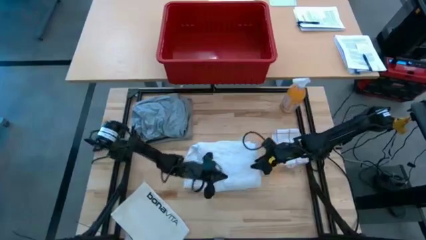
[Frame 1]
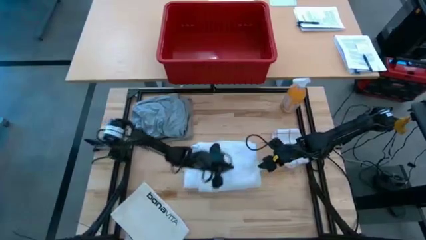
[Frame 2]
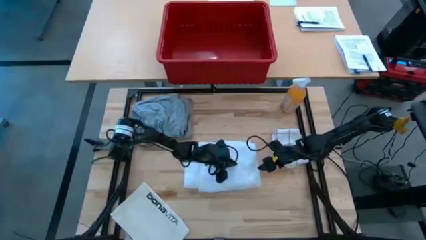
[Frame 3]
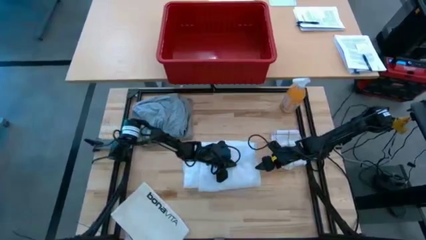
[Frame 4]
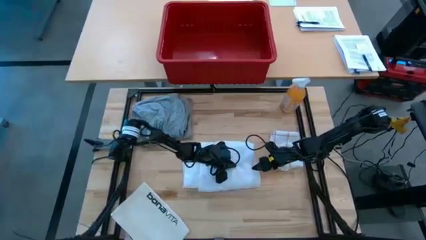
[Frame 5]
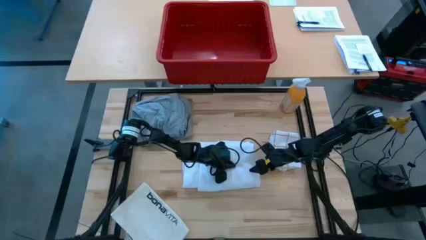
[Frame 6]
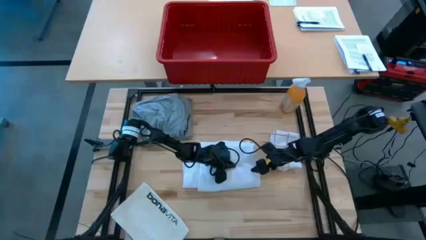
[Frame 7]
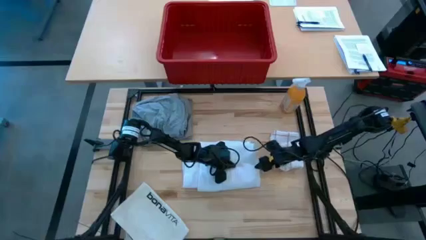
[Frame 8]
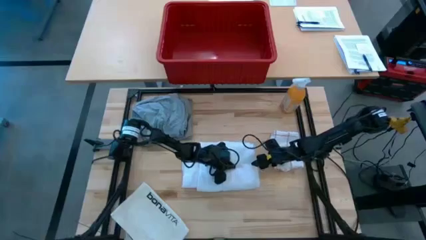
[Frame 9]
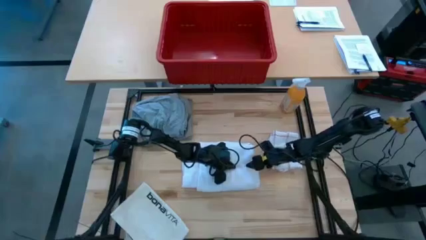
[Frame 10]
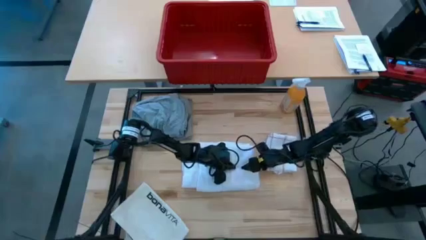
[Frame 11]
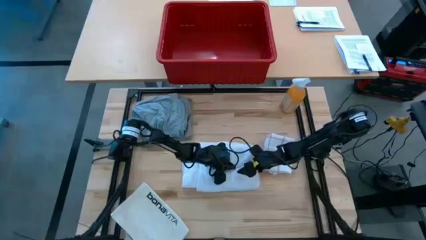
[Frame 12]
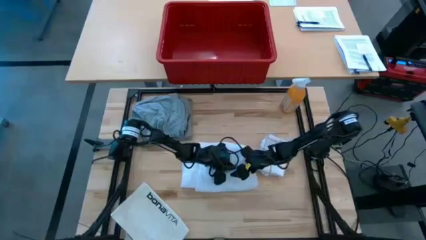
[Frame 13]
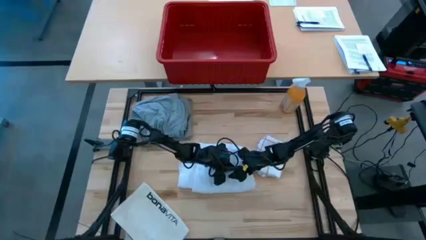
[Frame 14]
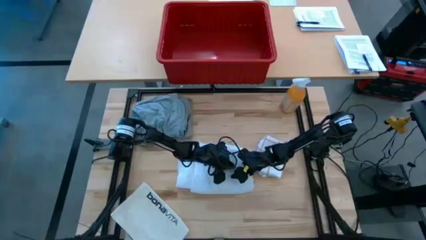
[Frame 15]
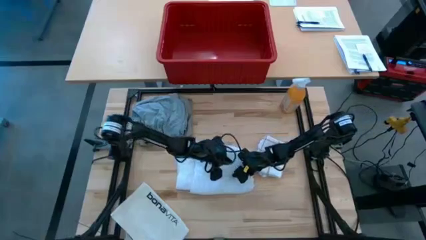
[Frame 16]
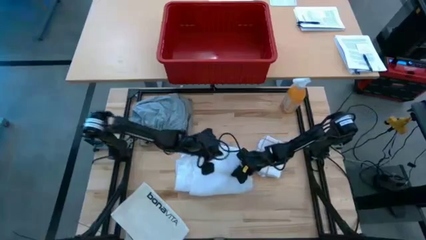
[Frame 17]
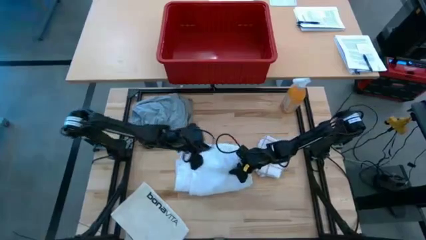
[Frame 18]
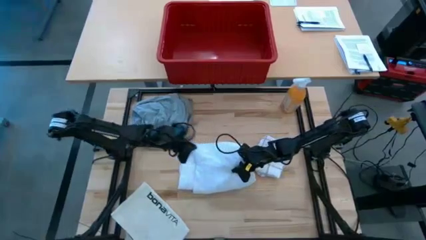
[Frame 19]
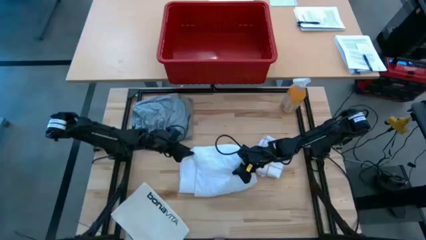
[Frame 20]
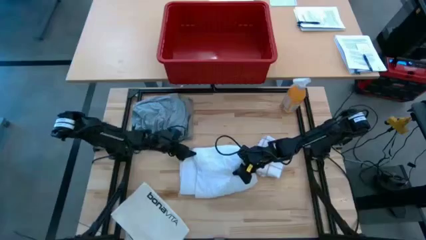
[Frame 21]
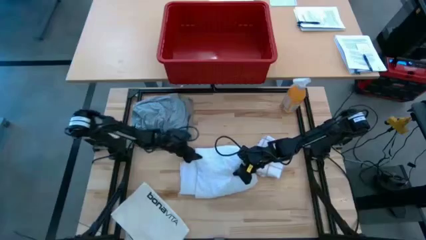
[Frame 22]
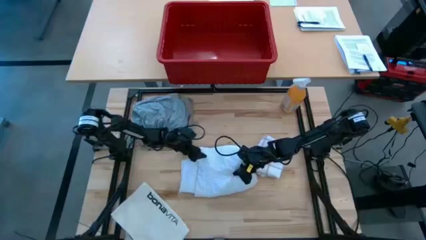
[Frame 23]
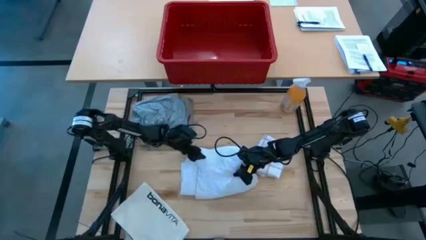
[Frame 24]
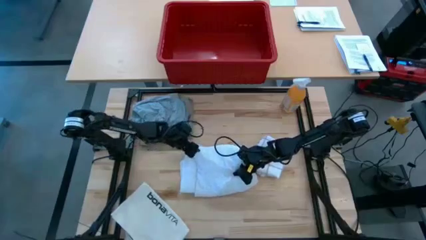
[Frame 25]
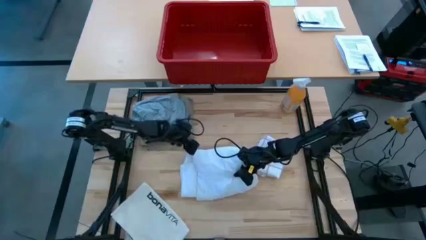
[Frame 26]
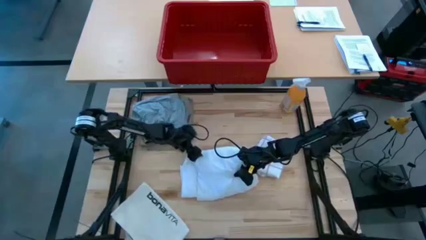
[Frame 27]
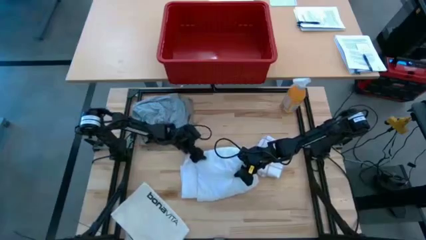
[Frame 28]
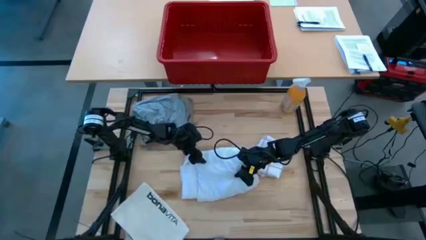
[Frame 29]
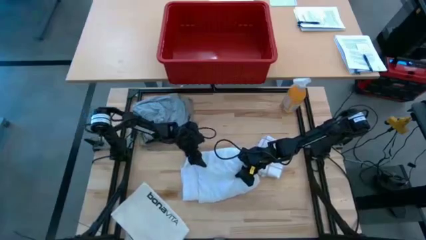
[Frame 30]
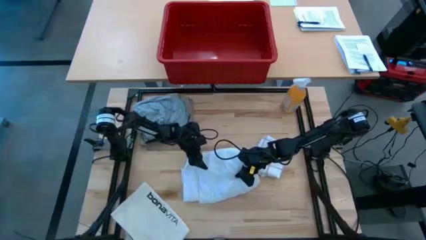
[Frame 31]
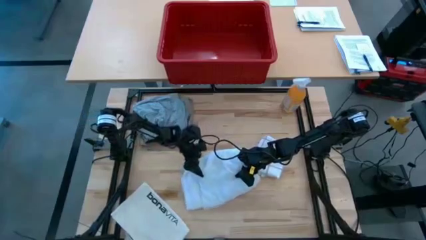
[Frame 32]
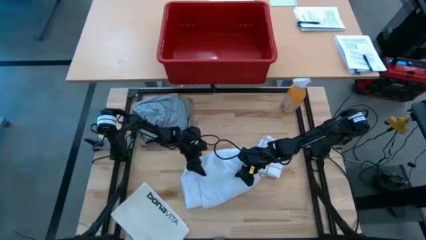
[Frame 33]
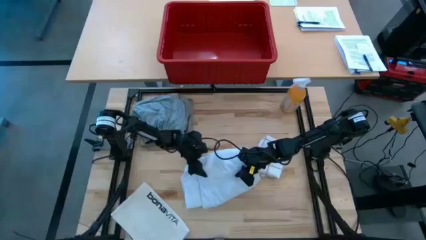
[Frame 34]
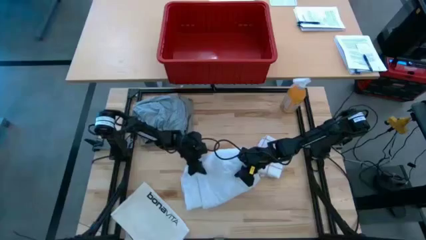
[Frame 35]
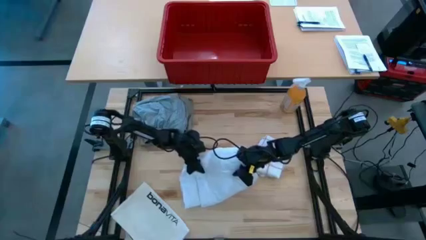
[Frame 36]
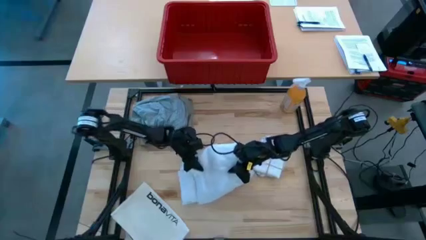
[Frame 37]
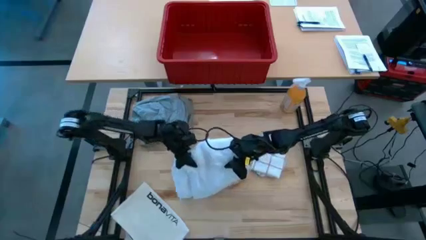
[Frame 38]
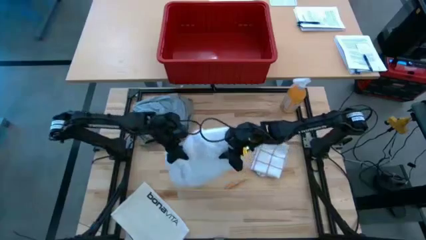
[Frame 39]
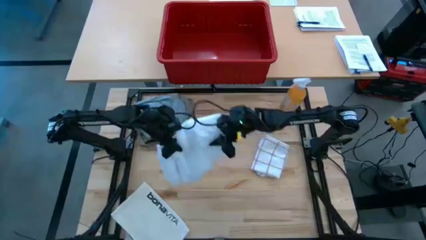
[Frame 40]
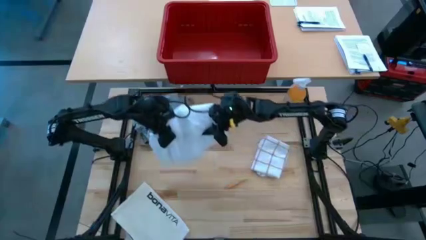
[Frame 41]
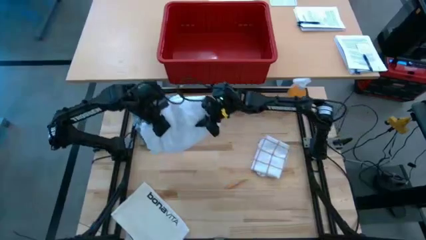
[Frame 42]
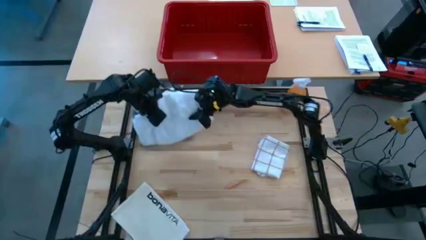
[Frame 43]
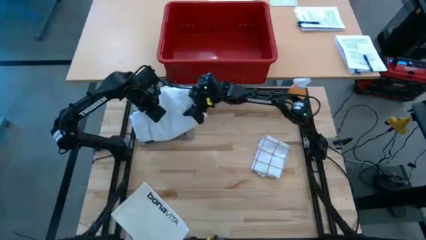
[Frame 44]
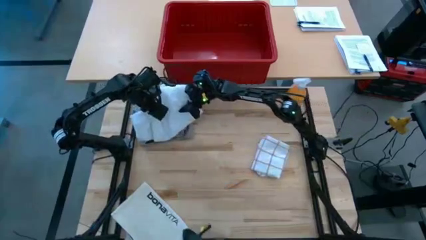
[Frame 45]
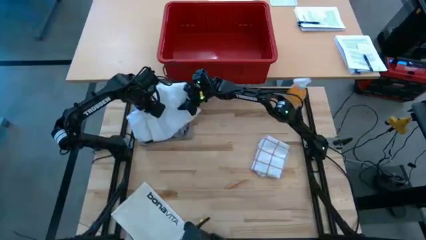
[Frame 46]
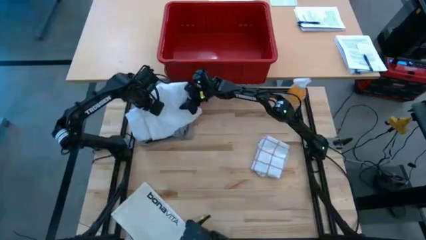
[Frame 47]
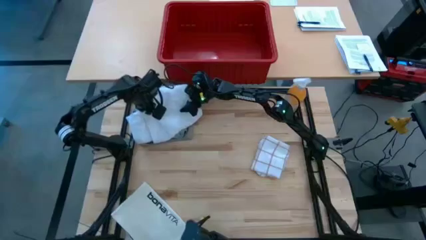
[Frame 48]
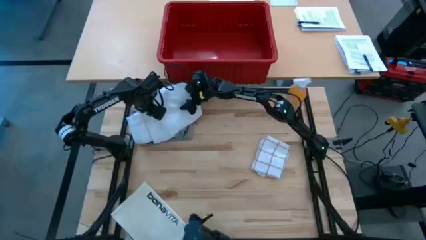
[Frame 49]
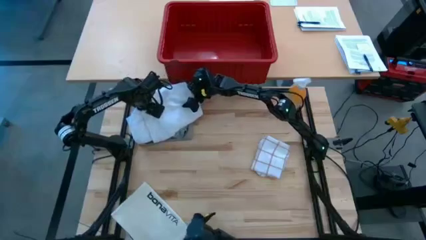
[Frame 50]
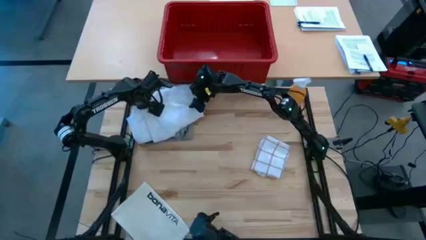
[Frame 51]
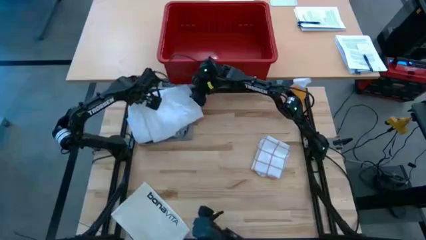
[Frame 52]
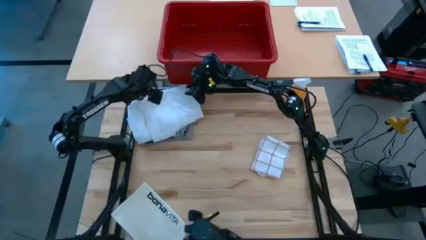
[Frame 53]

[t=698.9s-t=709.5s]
Task: Fold laundry
Stack the folded white long sleeve shirt on top of the folded gray shorts

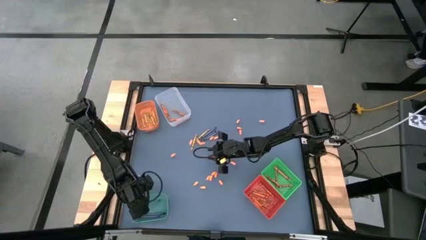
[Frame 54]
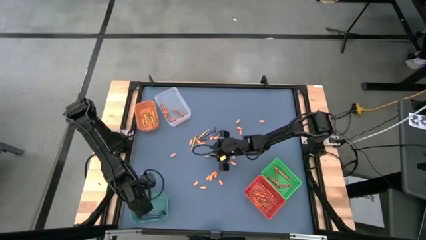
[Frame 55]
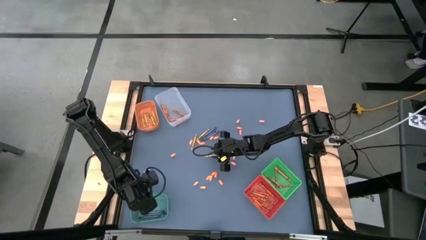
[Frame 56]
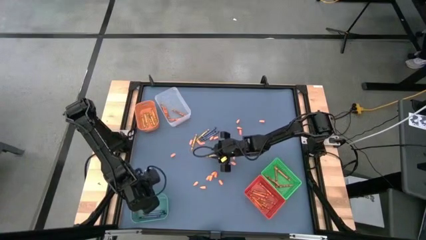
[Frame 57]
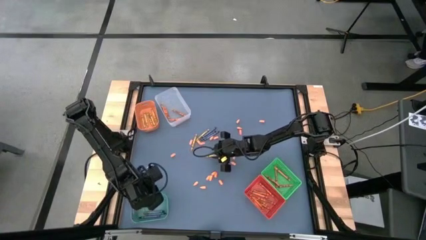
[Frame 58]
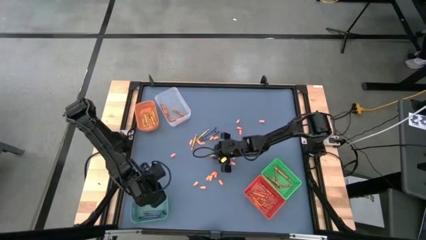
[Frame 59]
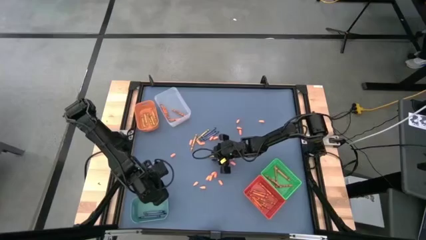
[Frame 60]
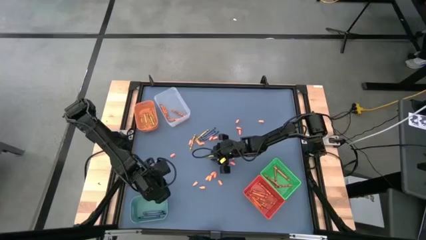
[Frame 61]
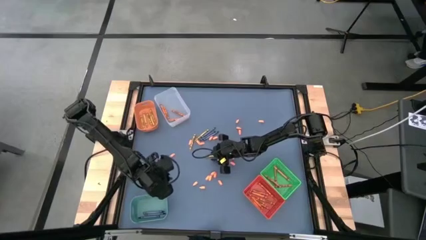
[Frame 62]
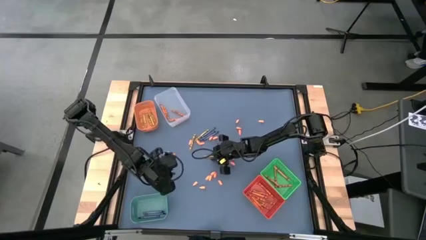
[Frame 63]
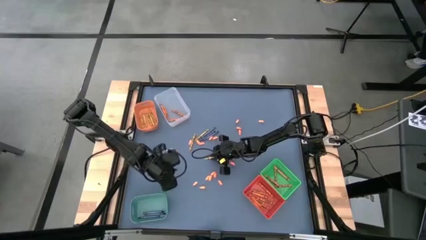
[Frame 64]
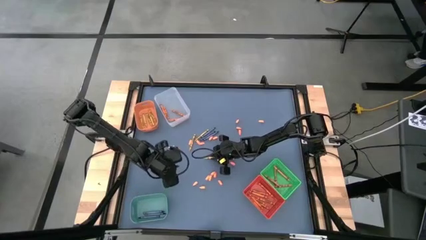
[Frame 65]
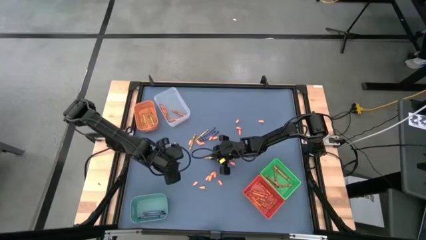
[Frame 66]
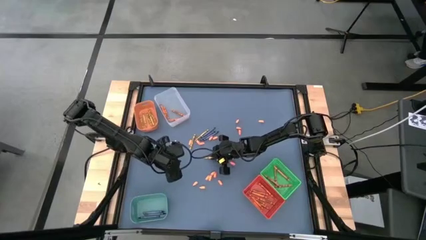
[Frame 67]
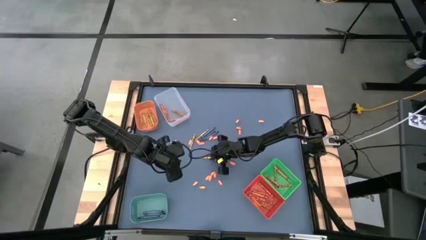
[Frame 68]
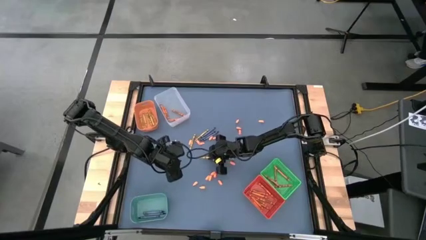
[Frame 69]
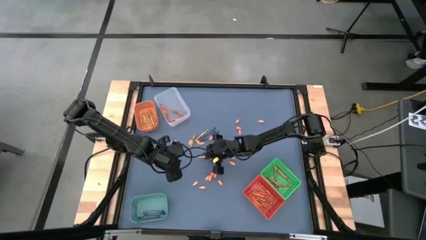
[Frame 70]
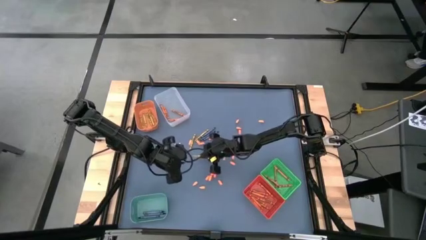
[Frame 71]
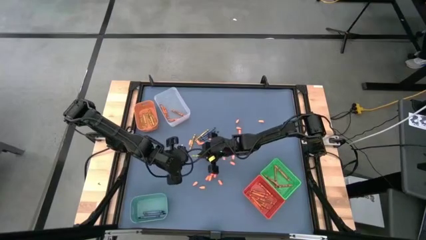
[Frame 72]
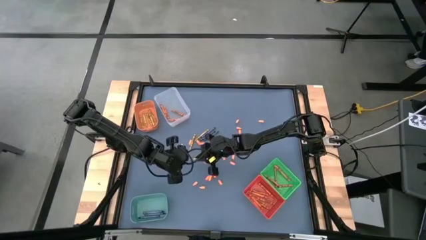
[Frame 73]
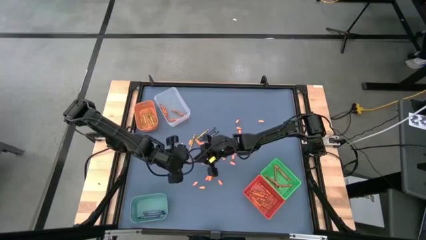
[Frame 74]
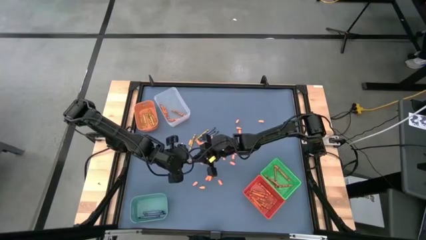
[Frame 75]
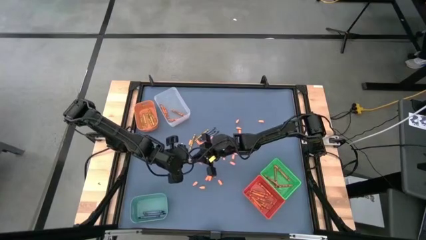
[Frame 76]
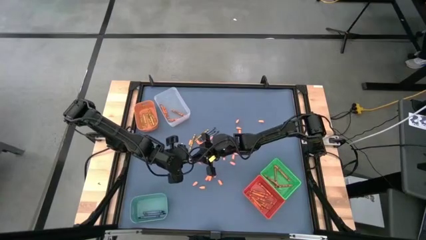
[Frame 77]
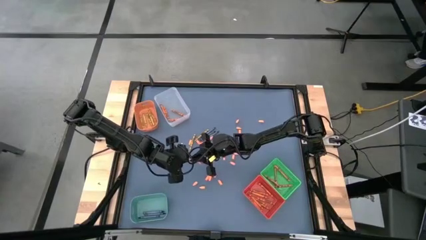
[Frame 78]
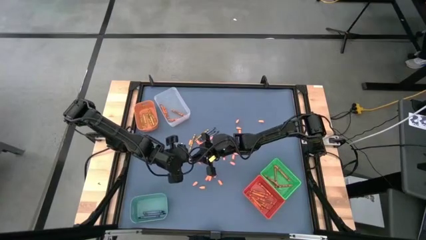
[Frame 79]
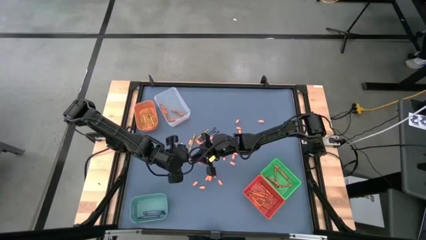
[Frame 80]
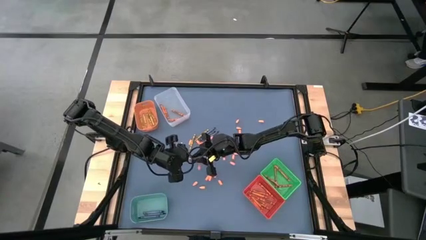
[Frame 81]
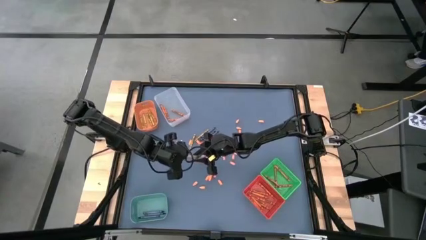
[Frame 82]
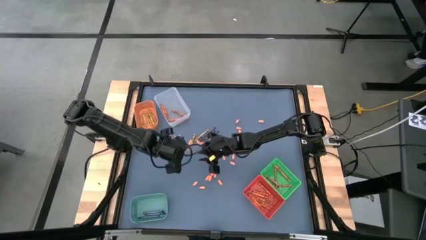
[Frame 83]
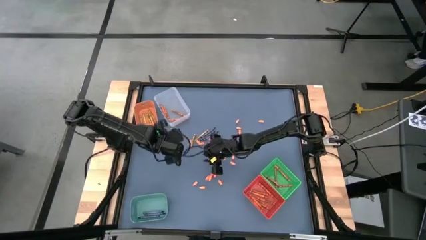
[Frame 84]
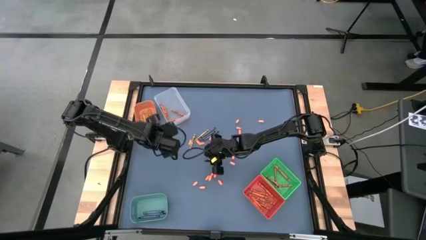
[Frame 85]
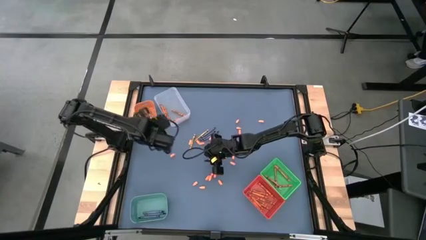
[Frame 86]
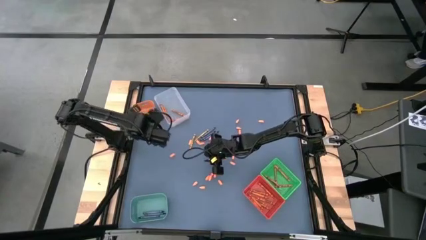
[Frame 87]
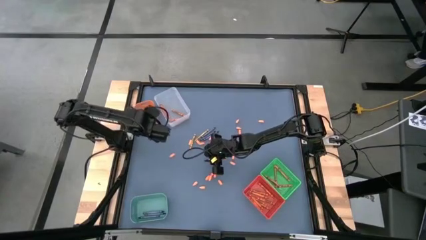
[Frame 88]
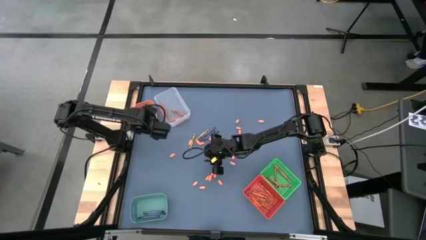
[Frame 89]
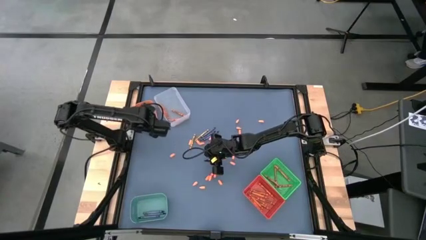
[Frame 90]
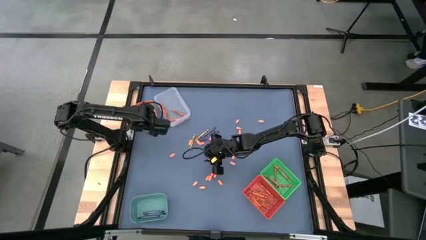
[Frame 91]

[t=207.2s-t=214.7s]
Task: Sort crayons
Put the yellow crayon into the orange bin
